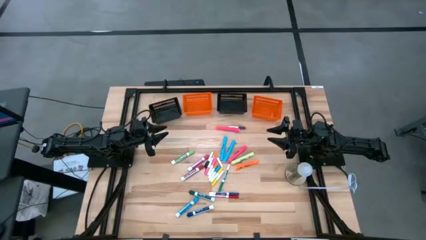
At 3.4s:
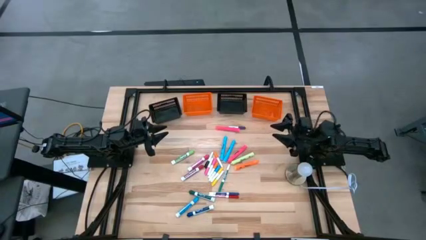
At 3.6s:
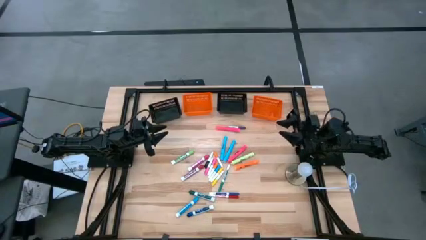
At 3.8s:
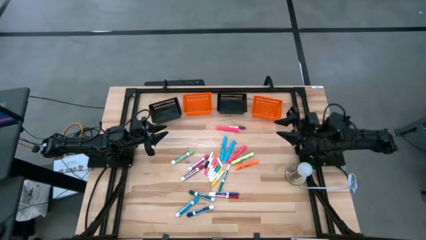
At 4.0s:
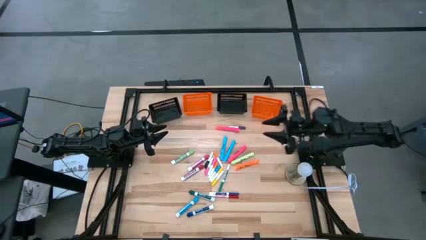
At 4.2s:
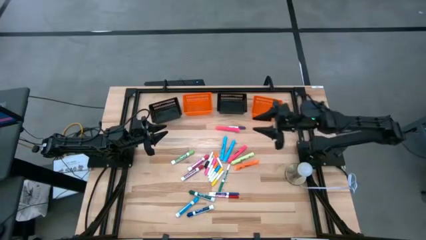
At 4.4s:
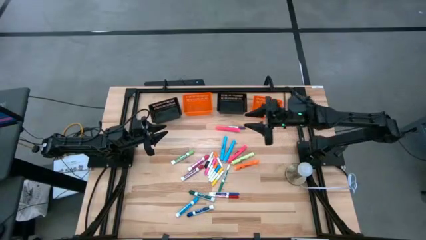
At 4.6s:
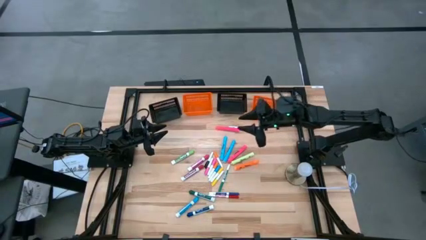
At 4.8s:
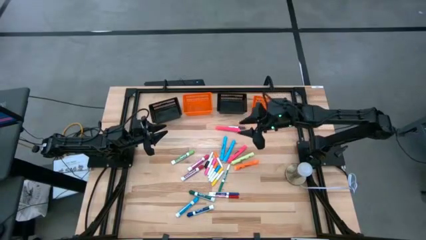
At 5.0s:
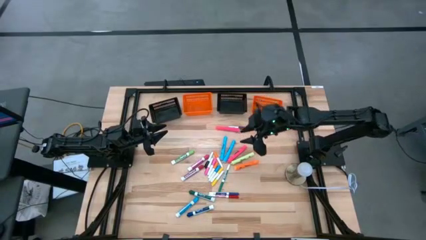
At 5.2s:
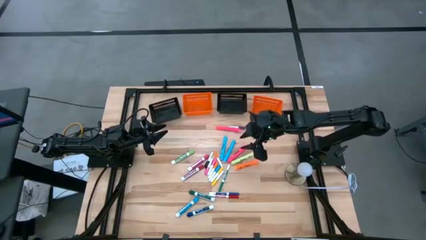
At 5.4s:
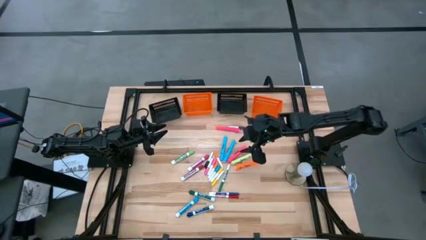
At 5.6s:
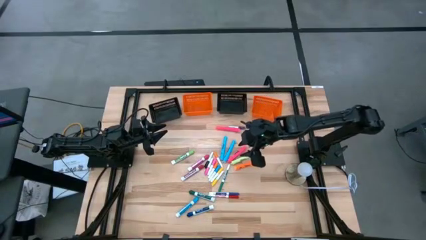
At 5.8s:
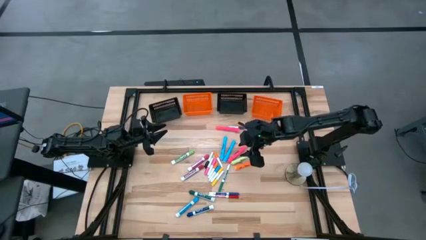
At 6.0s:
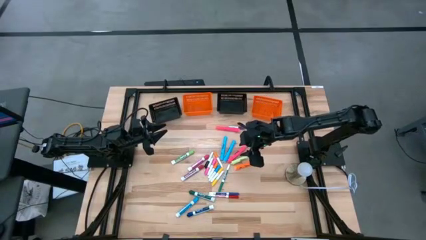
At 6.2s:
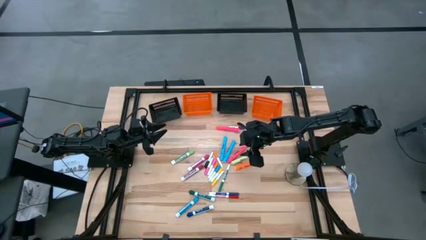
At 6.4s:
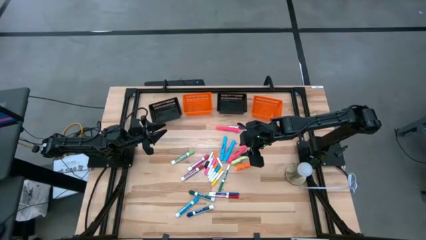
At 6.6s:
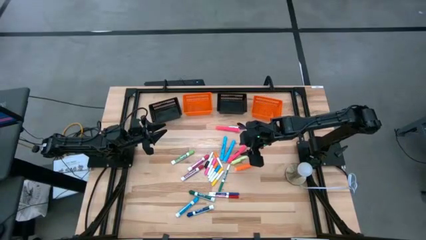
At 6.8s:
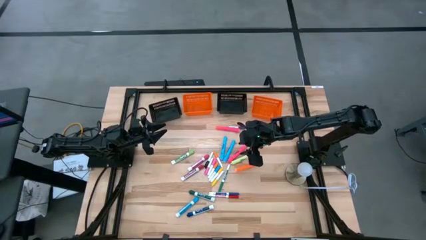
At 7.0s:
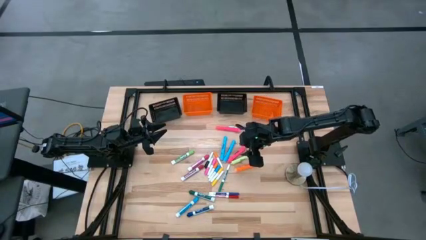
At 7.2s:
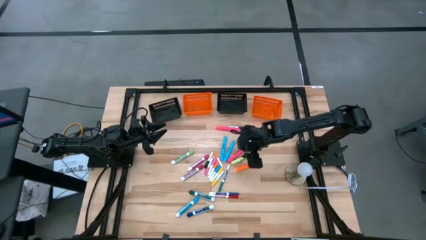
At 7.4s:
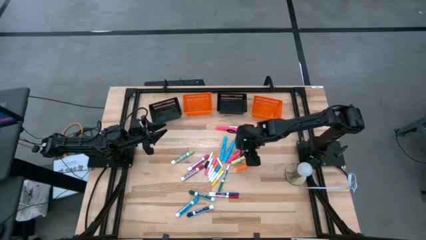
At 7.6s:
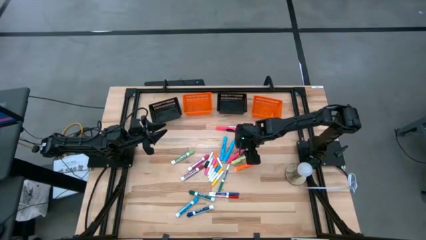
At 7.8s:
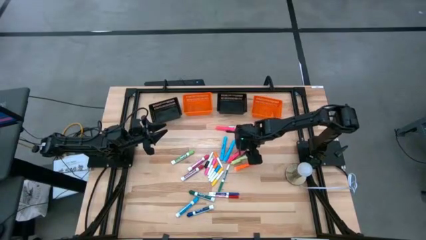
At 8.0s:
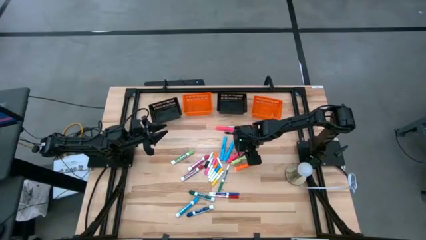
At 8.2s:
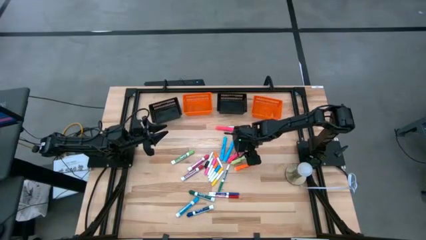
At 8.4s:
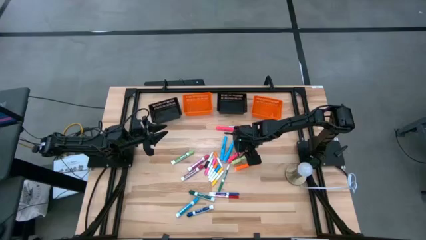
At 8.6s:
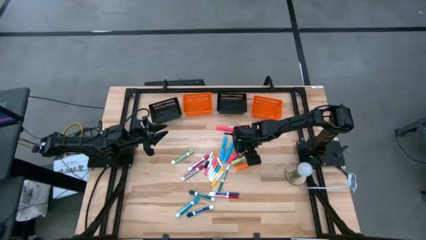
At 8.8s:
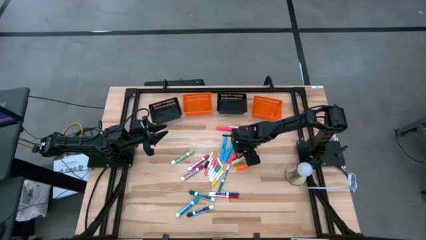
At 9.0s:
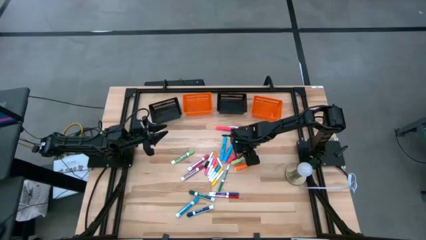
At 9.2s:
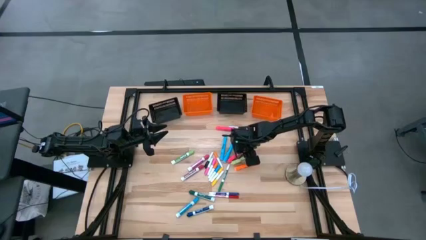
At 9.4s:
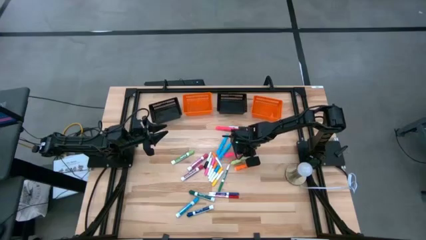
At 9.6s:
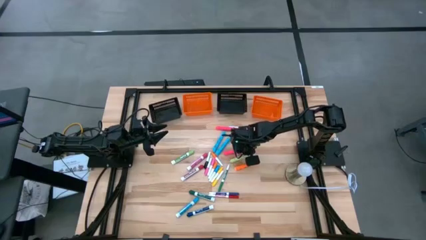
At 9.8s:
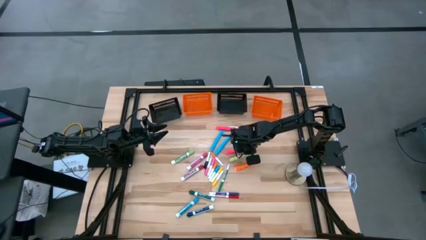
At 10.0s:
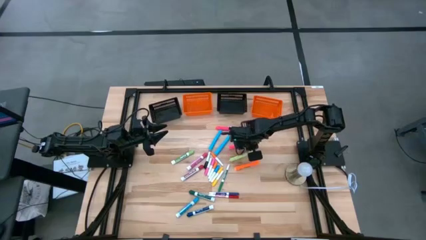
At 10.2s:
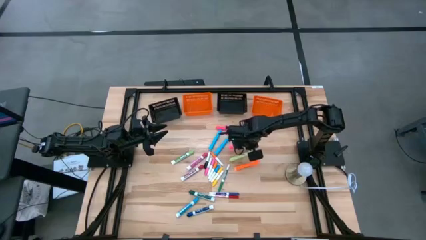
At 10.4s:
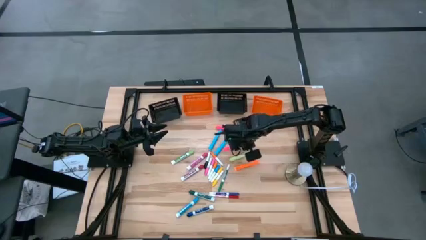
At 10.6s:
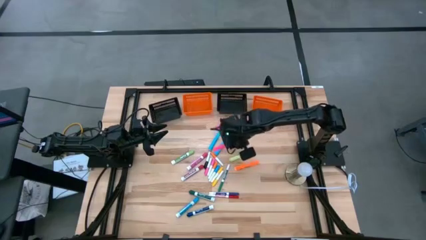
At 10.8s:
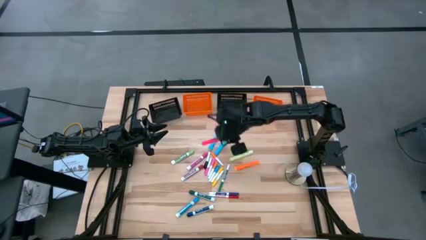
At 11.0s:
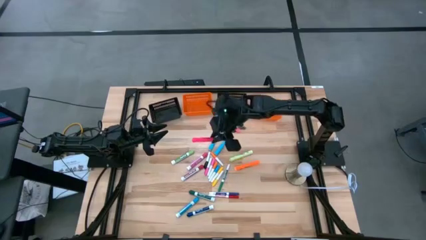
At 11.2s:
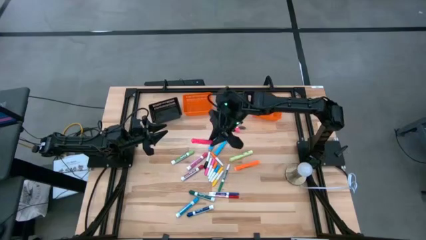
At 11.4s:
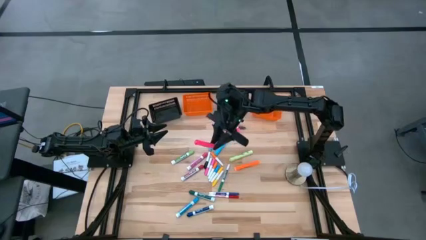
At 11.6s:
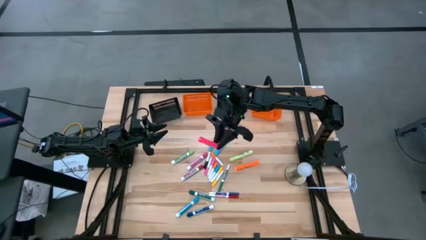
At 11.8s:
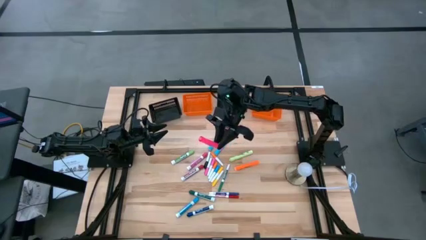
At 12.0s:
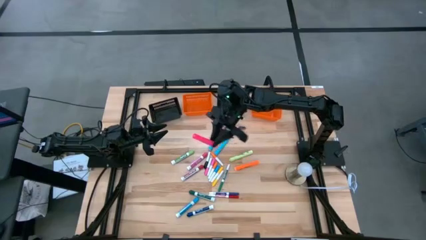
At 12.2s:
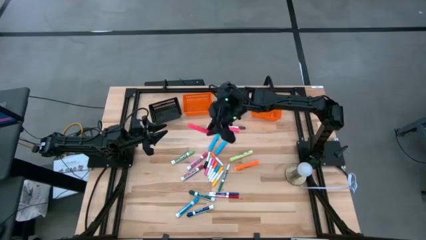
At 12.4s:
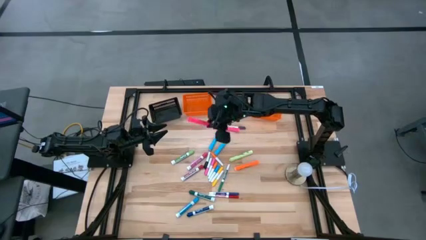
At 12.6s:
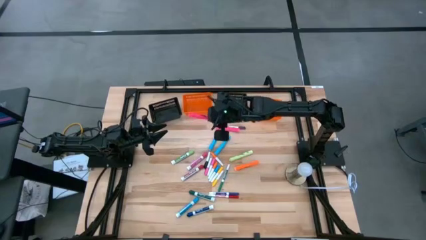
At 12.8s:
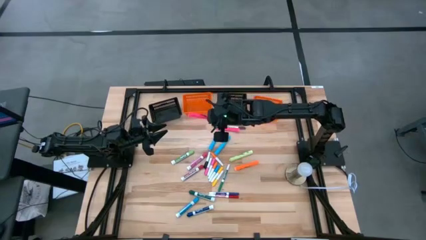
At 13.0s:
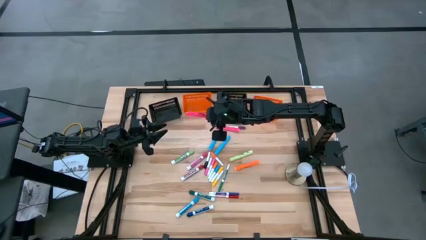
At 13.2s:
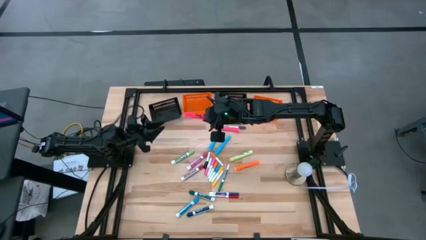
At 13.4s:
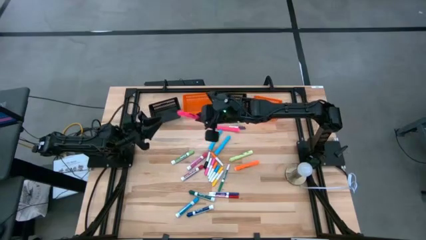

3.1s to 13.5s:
Task: Pick & Place Markers
Put the bottom pink highlighter into the left black bin

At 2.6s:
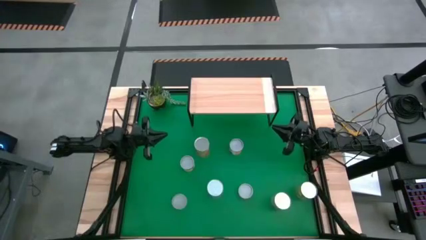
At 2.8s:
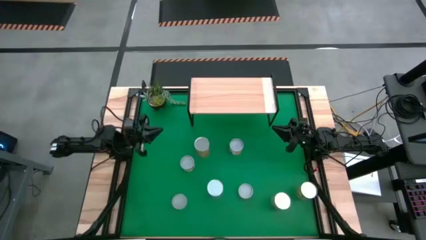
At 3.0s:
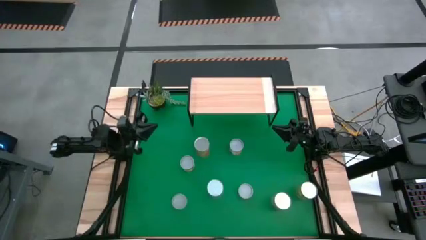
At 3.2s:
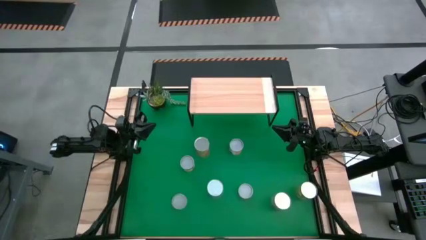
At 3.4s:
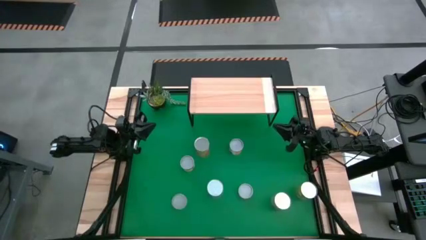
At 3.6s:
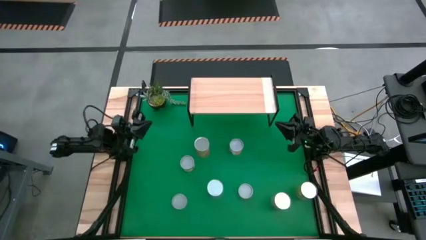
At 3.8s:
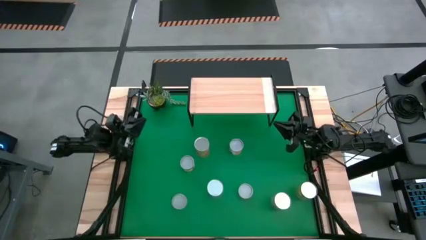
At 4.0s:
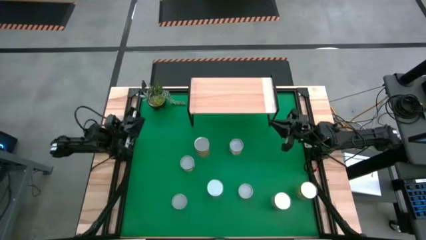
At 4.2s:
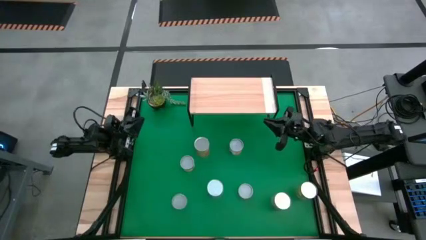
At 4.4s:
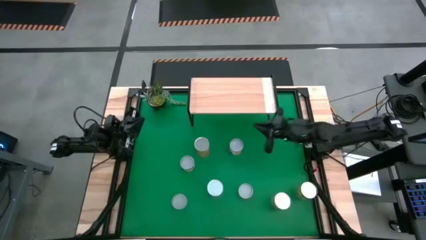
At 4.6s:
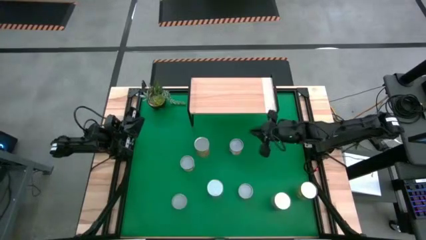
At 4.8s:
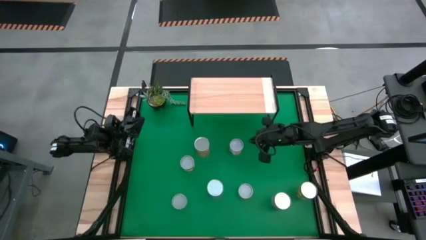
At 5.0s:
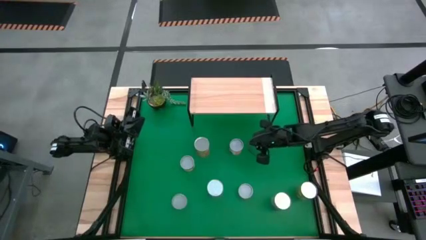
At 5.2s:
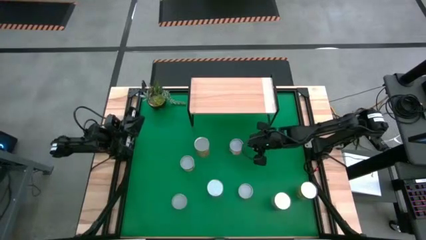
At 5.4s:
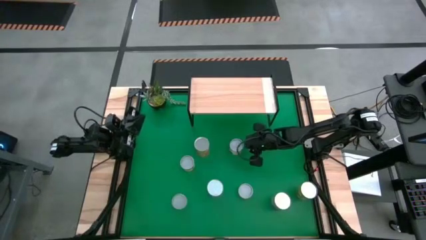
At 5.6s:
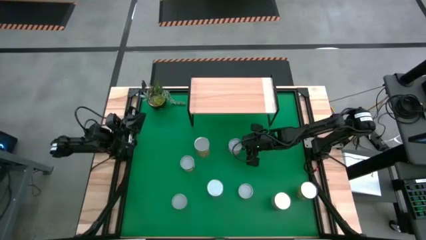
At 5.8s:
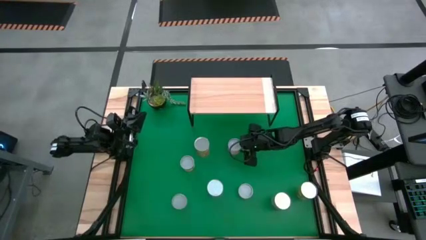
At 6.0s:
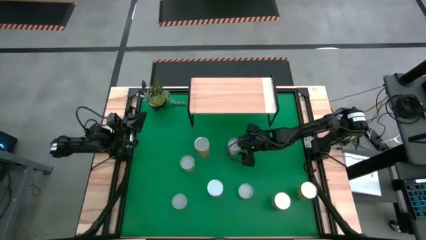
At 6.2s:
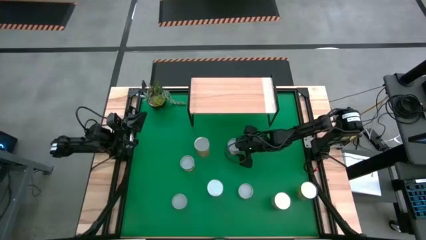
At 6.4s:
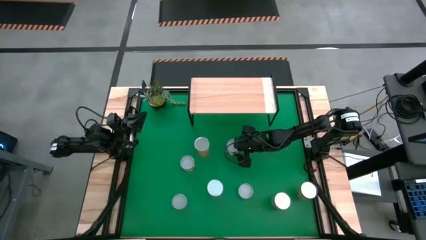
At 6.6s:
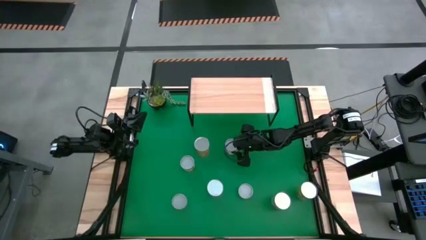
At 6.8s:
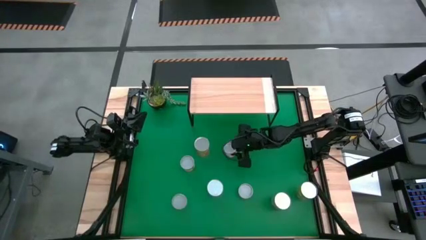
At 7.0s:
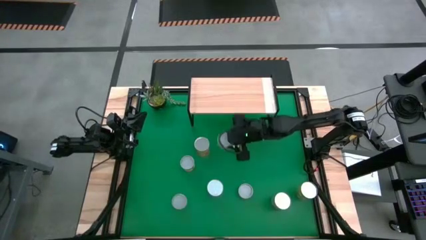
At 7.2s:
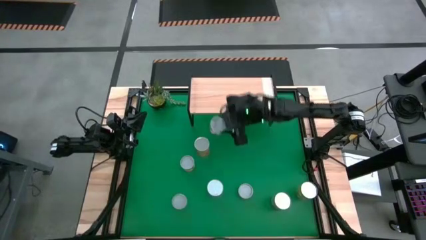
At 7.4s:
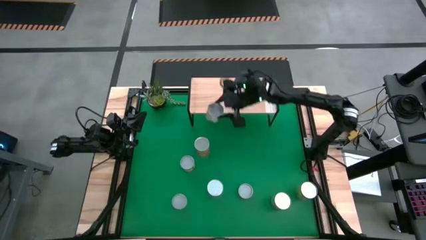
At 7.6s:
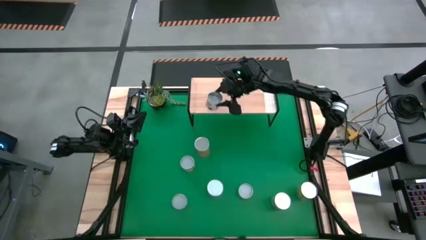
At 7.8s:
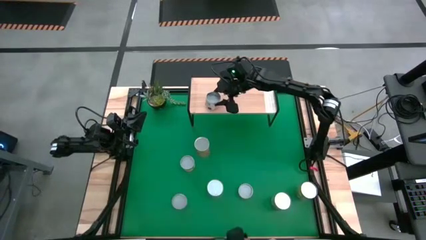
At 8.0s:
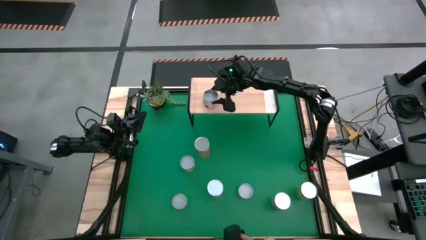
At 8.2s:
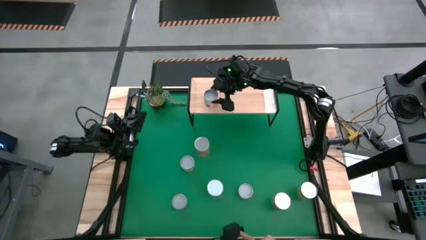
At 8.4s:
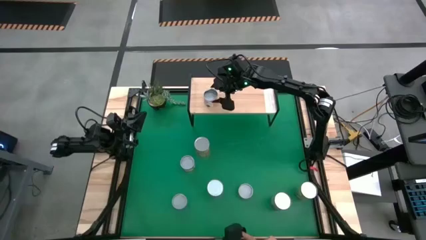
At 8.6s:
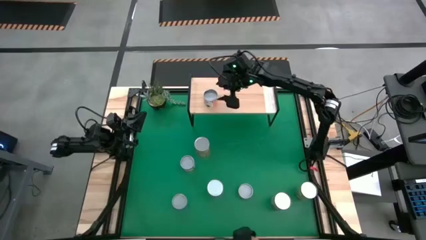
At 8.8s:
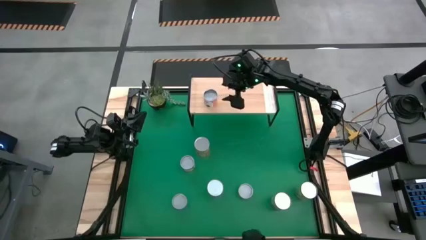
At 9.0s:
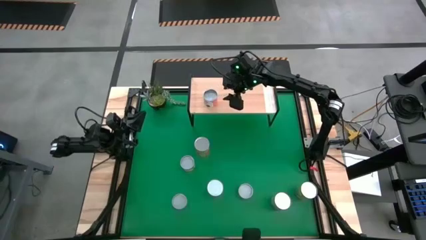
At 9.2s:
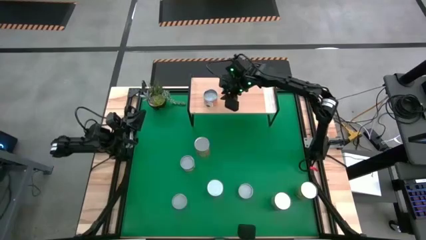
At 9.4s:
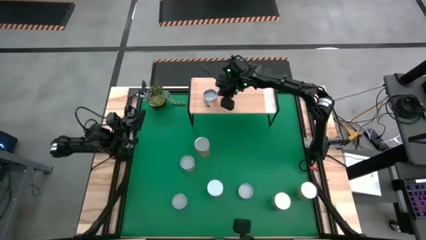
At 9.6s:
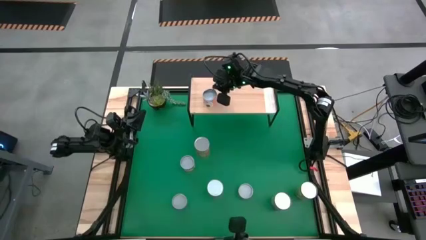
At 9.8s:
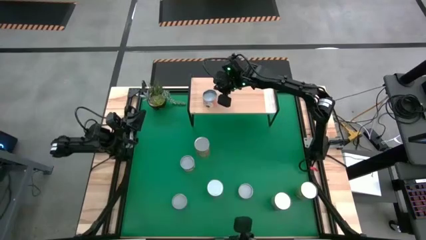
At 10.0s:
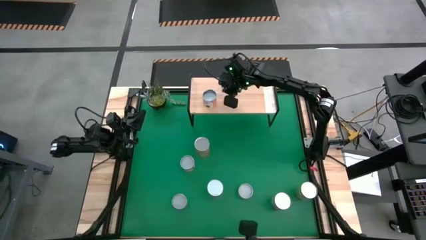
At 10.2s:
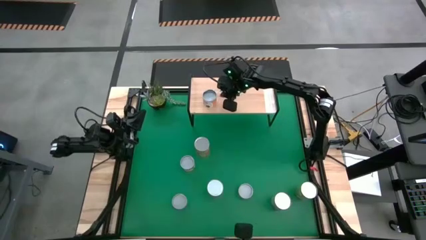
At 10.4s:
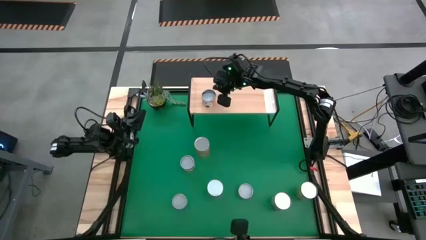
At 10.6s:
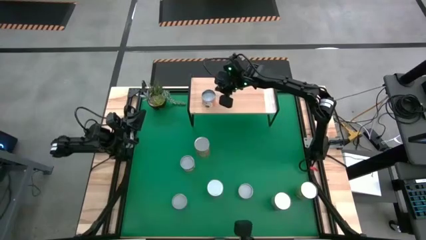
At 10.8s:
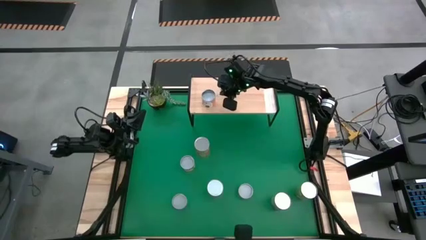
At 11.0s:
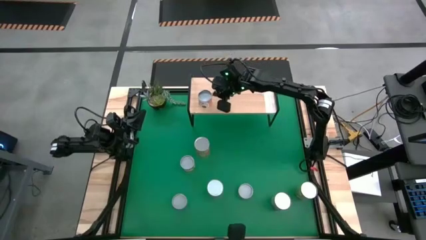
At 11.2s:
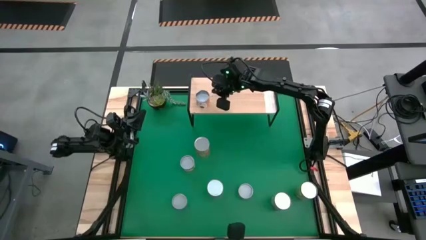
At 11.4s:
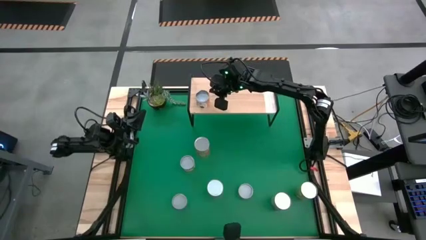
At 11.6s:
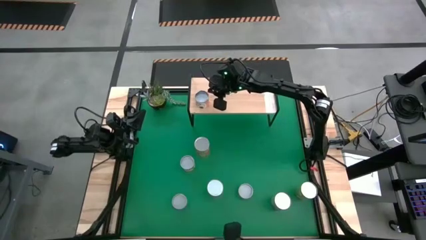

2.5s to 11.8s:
Task: Pick and place cans onto a shelf
Put the canned meatballs on the shelf
